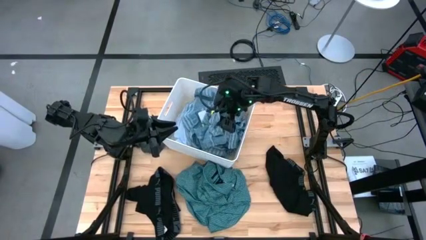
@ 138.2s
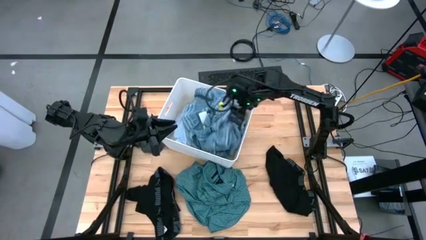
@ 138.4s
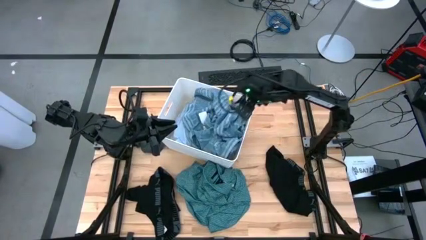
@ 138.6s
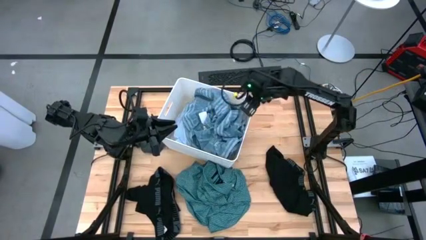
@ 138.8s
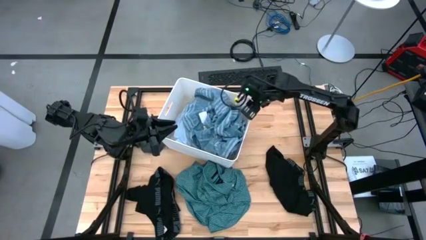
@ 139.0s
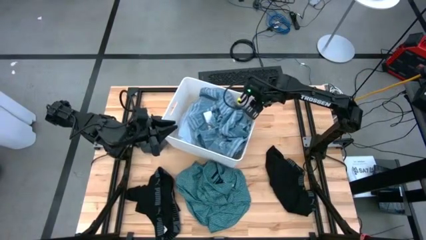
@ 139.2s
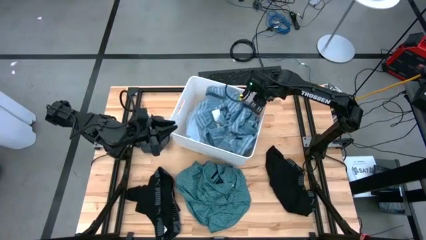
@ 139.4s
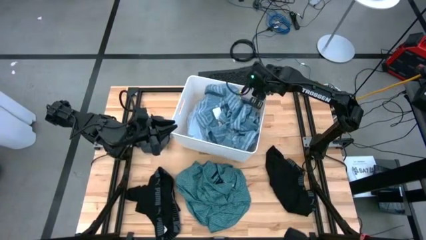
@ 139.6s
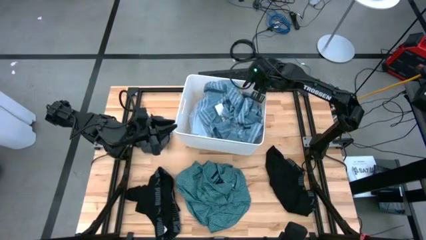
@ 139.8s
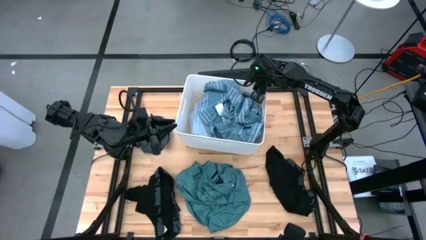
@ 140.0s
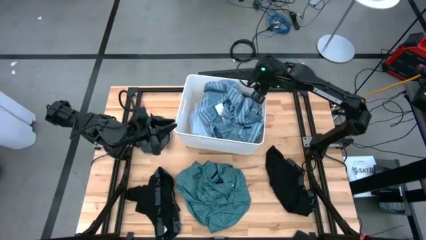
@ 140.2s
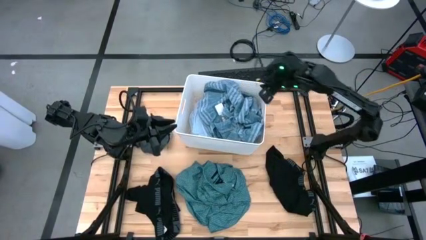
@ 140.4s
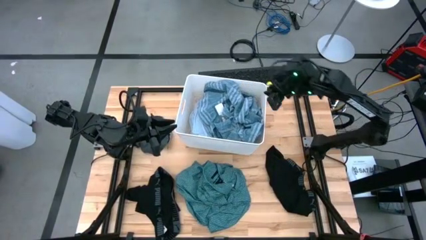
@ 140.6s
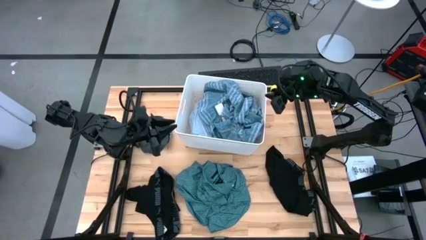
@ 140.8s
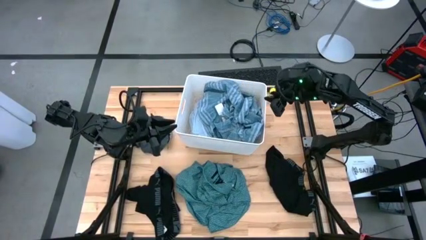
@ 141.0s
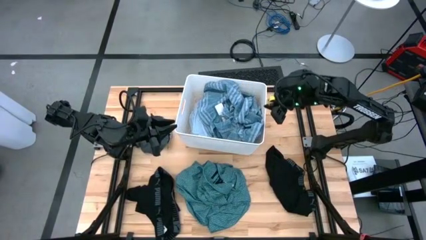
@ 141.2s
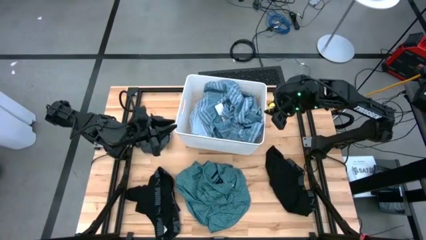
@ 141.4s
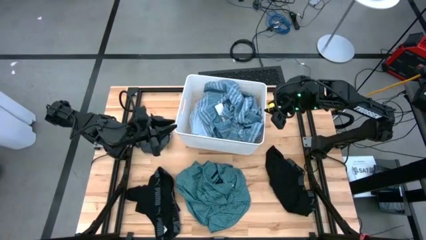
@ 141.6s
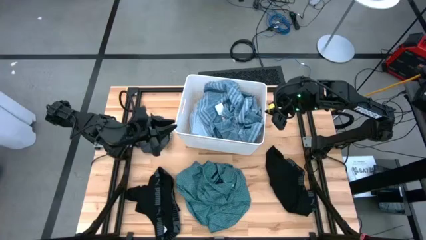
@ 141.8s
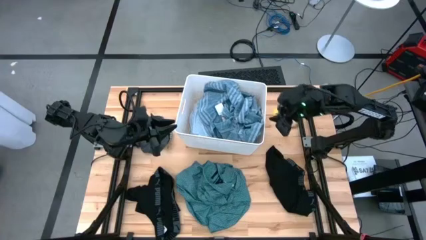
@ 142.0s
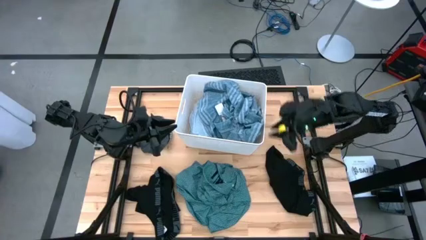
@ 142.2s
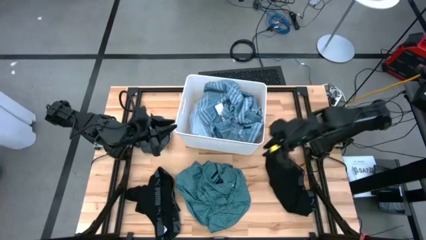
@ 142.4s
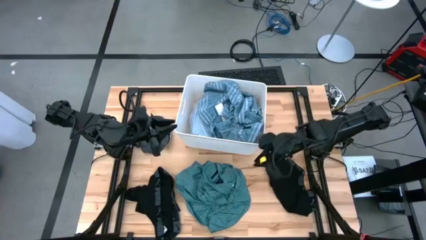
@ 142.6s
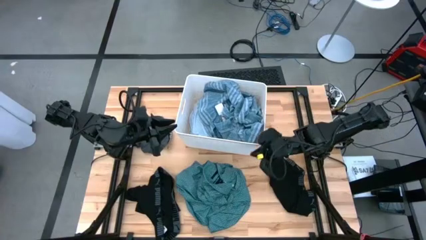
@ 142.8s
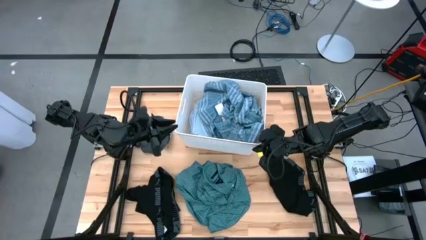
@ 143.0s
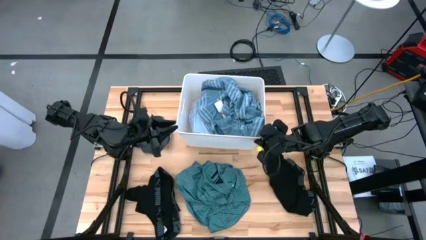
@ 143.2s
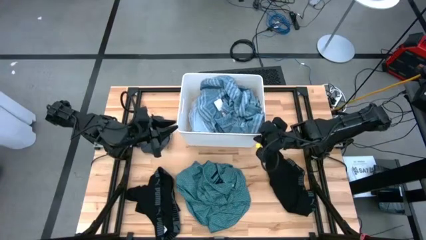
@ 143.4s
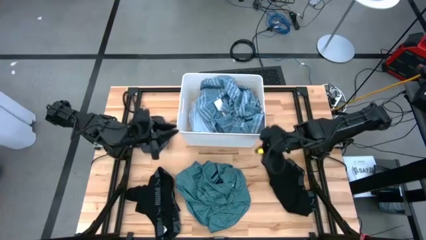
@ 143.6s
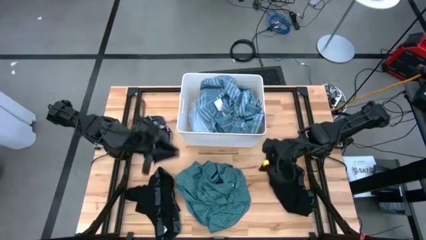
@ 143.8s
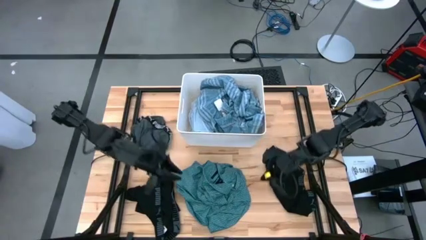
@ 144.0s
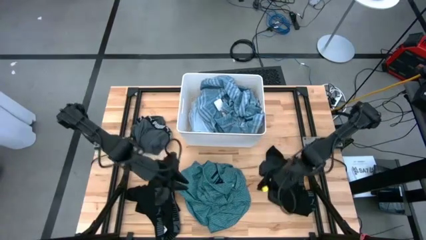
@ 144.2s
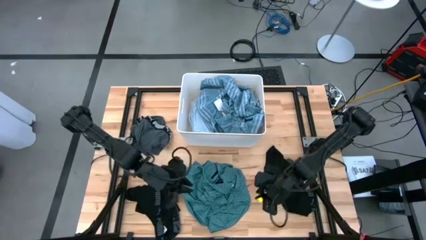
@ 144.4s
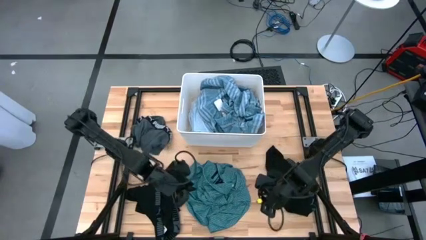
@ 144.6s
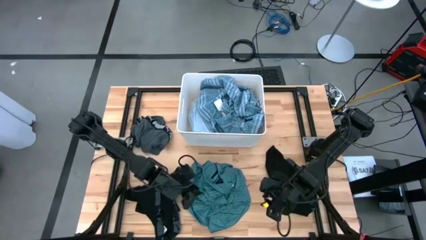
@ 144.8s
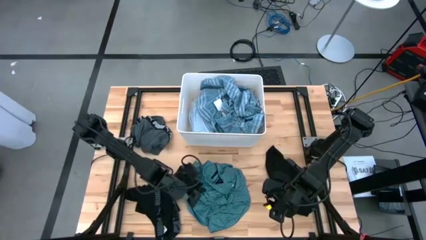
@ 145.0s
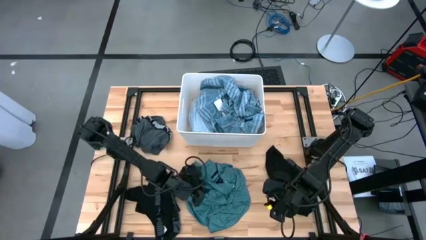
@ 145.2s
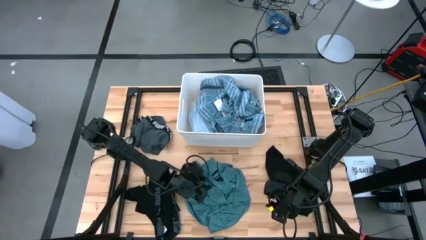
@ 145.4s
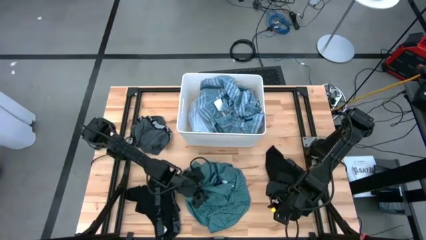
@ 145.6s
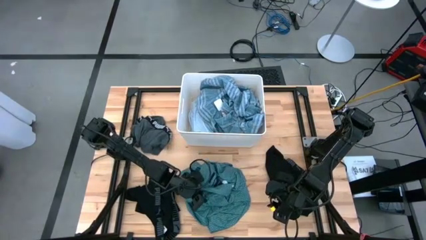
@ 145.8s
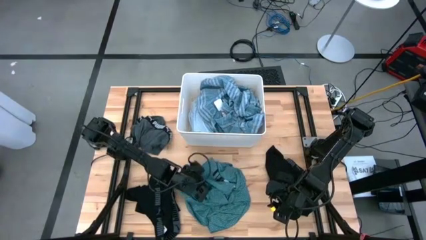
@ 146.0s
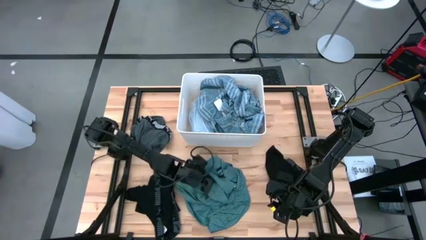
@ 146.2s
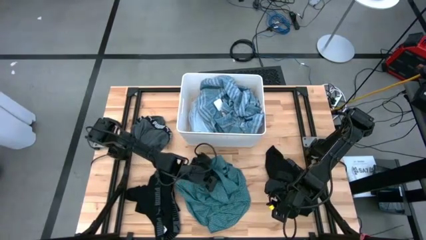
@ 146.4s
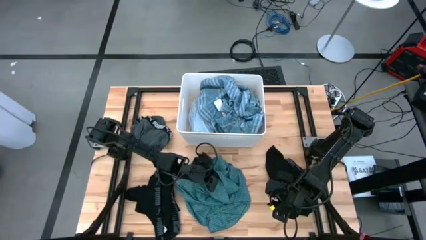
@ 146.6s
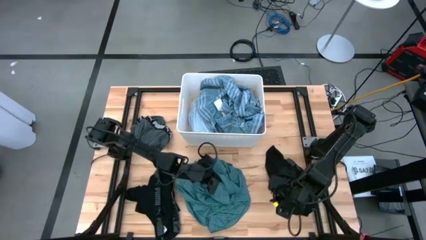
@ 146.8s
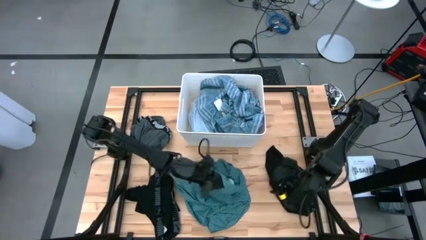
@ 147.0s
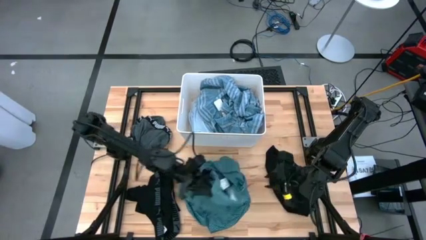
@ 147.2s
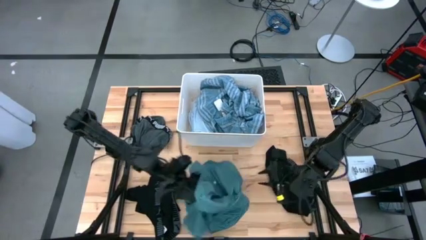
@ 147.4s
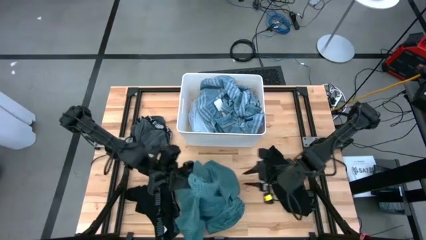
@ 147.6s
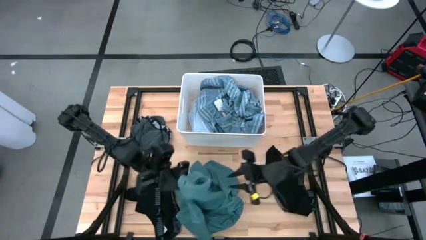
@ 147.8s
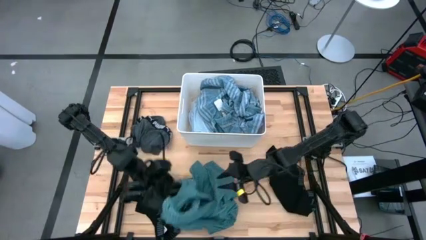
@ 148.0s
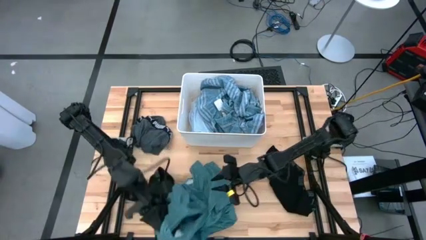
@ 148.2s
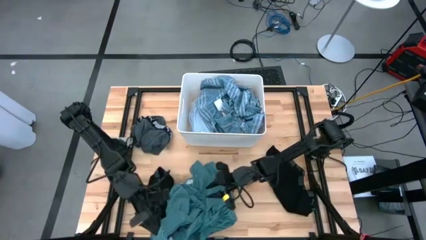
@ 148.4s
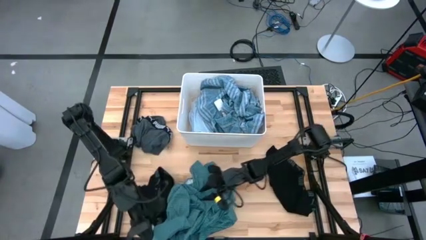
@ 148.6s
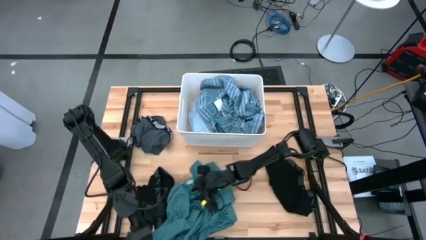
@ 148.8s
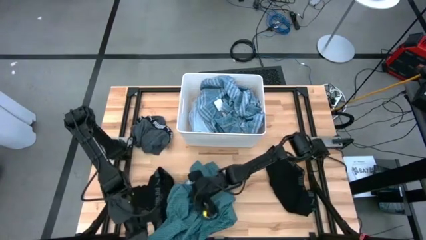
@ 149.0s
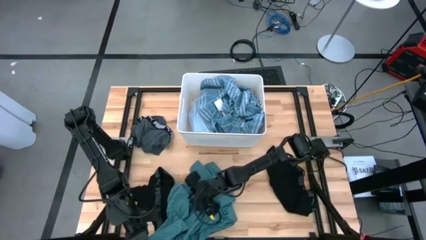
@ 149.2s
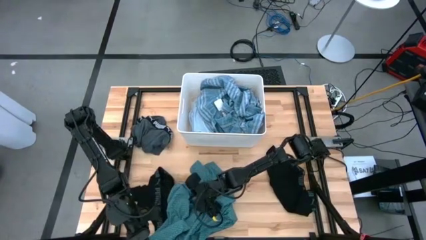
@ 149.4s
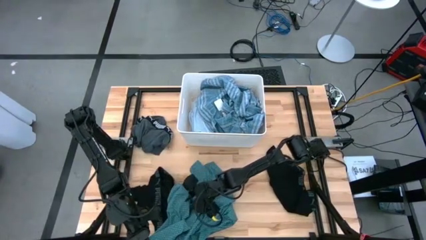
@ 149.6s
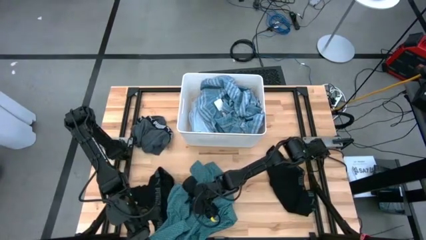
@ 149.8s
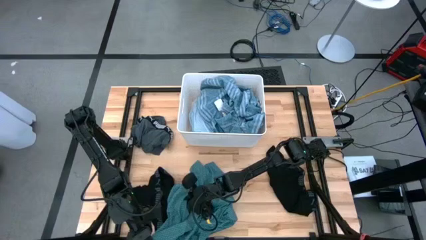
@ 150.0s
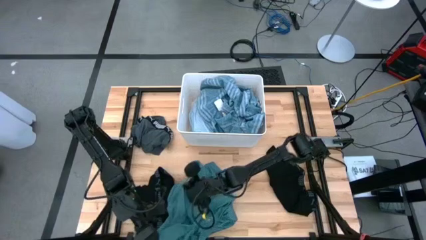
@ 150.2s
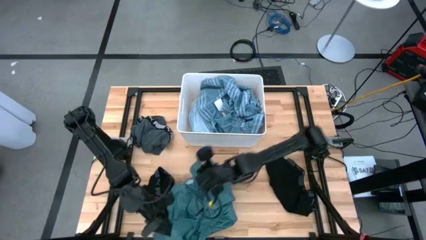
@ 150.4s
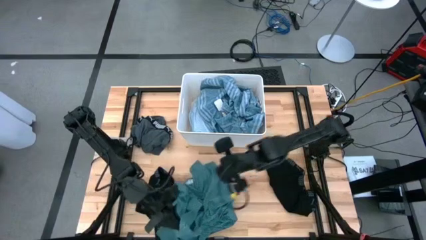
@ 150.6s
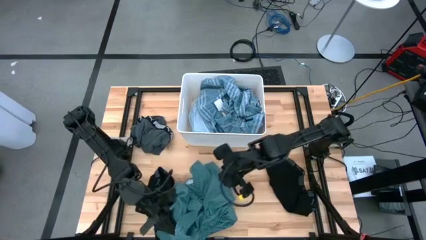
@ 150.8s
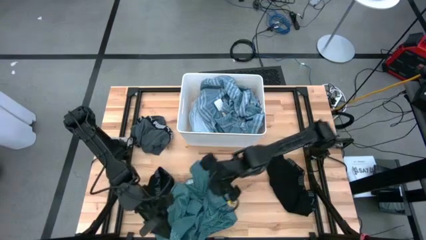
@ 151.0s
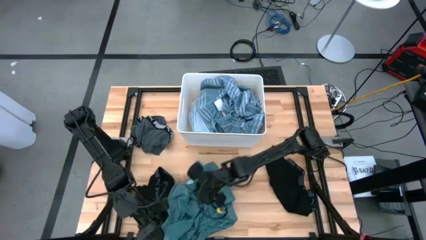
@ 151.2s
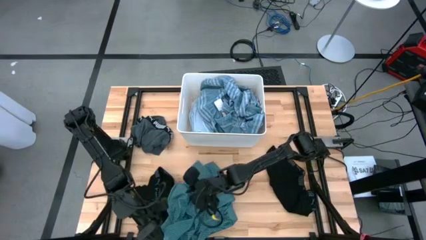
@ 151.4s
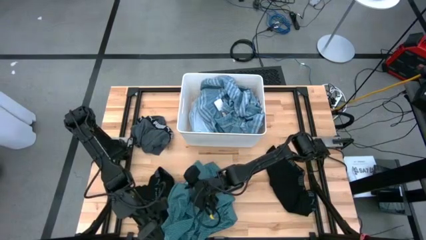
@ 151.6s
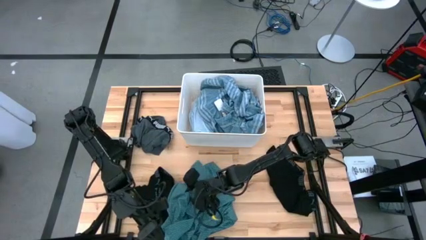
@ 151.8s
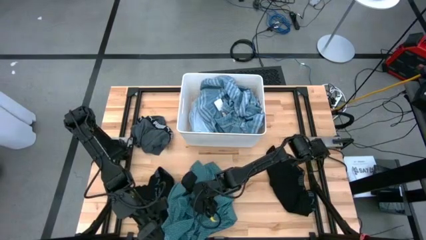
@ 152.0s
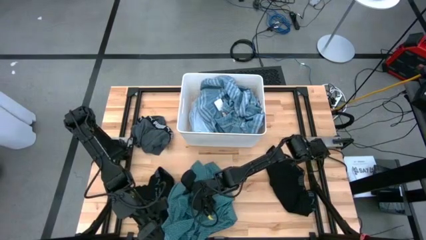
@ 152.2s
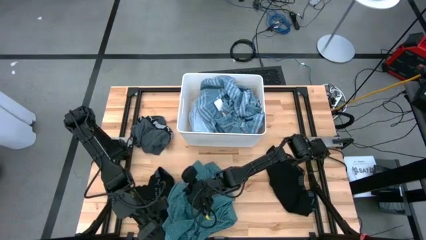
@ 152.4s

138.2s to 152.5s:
Task: Sort clothes
Adjust the white laundry organizer on the table

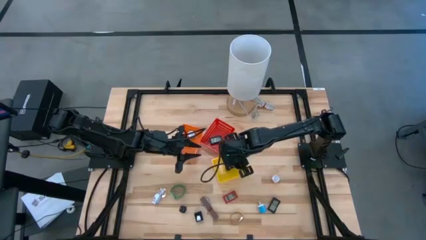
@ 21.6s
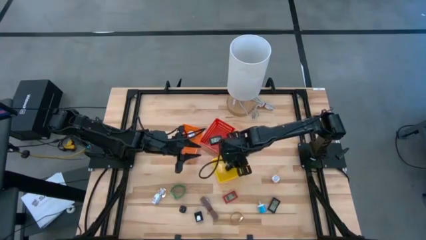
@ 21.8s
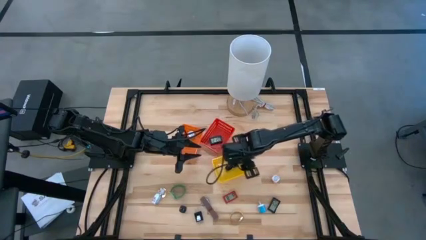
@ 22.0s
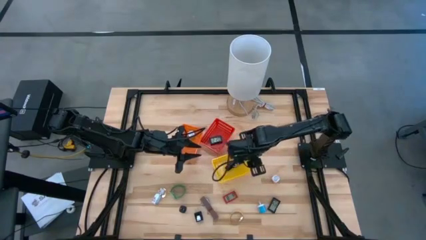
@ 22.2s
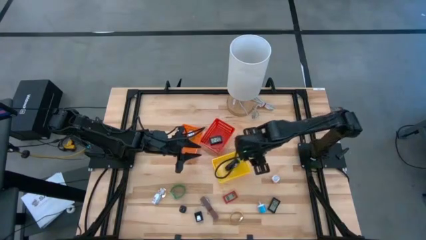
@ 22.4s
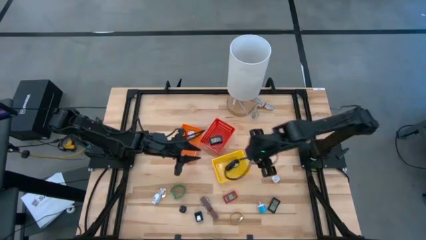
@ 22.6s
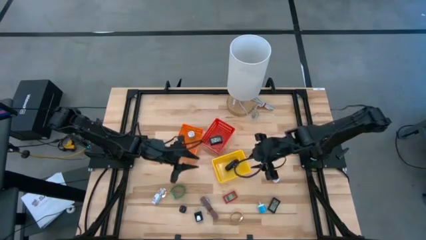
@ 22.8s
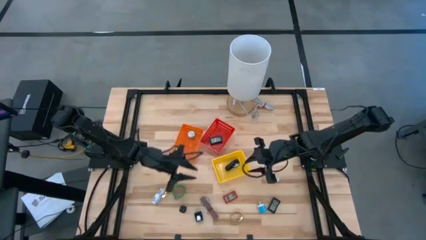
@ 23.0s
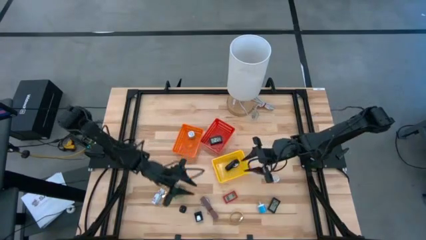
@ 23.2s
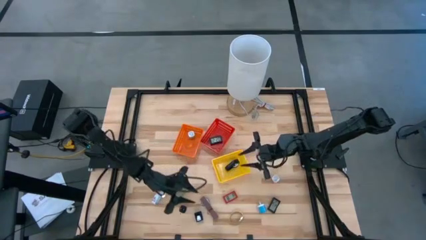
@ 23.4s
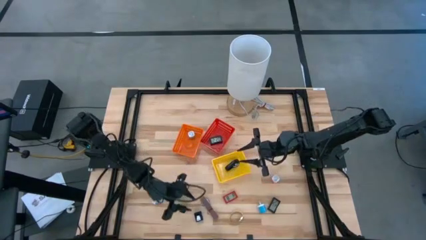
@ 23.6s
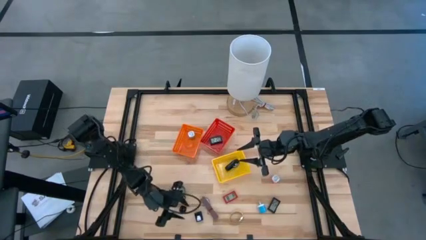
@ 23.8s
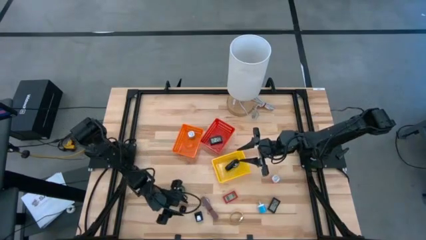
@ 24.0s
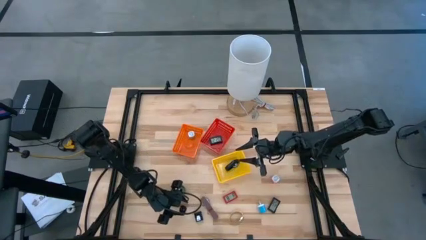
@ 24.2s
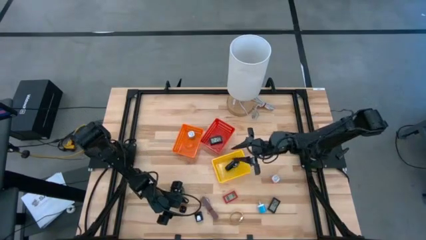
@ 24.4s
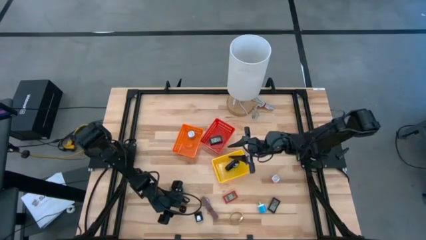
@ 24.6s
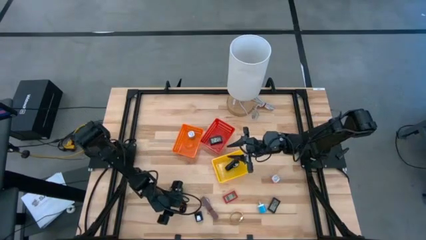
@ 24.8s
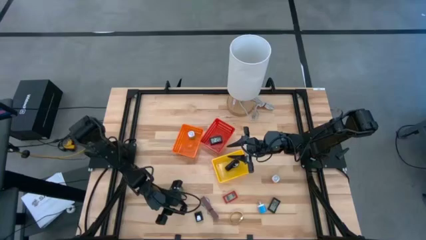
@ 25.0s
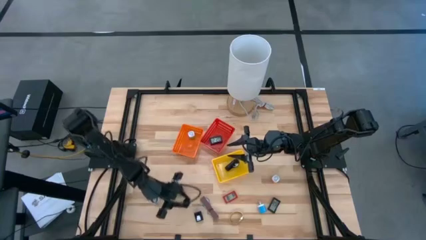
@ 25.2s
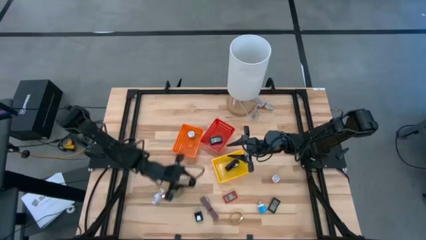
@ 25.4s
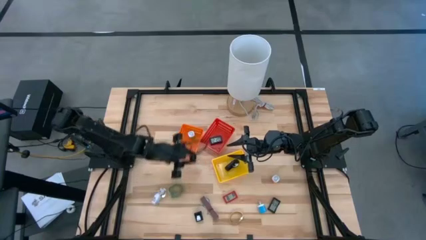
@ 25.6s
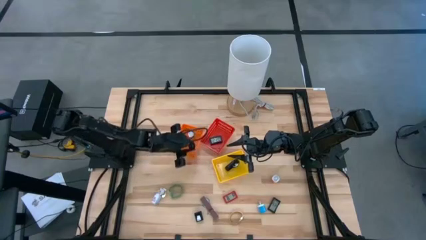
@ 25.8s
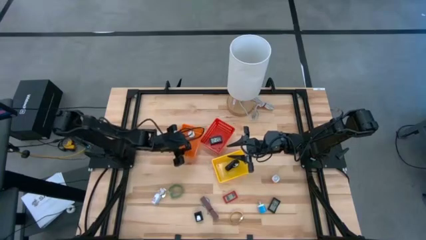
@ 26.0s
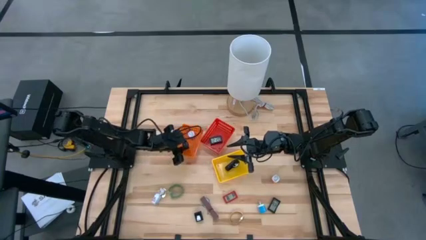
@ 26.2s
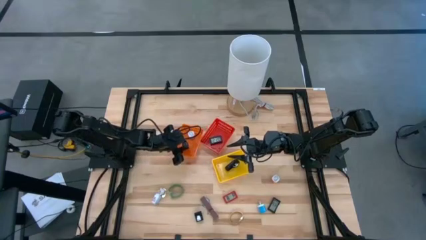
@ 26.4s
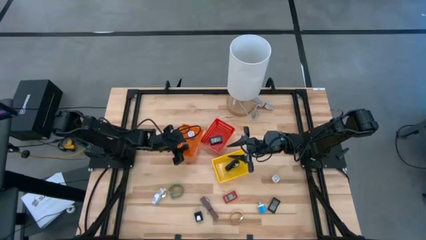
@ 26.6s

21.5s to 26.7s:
Task: Pick & Place Office items
Put the white charger adapter into the orange bin
